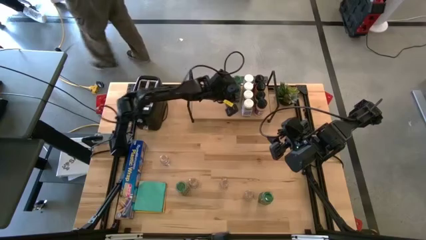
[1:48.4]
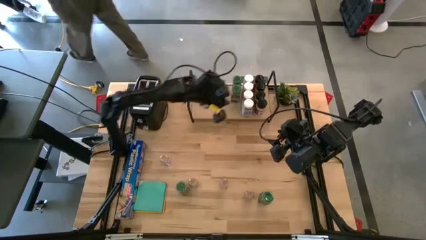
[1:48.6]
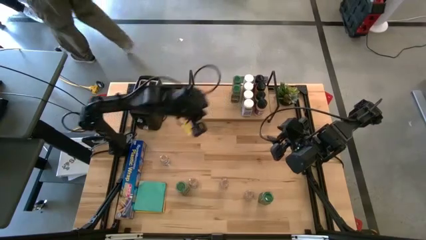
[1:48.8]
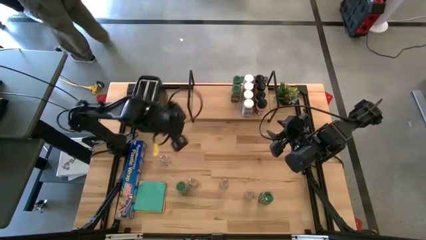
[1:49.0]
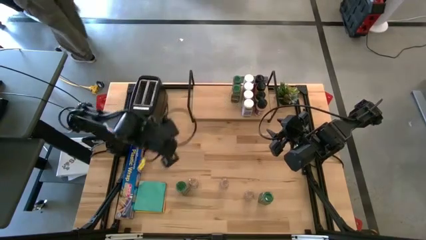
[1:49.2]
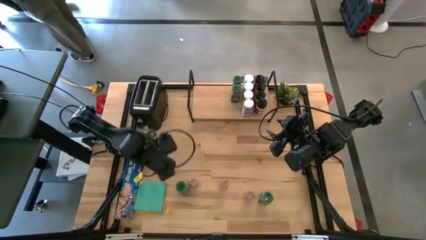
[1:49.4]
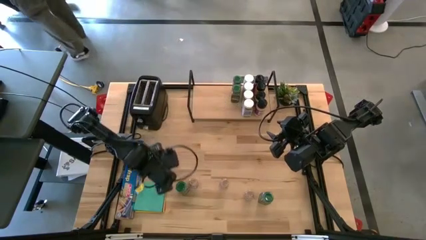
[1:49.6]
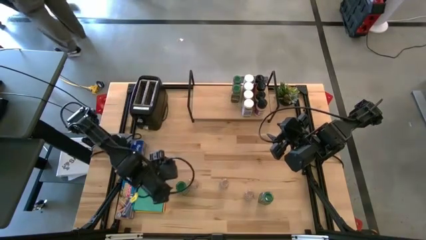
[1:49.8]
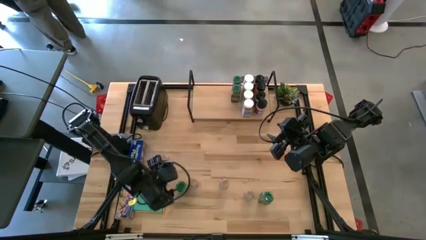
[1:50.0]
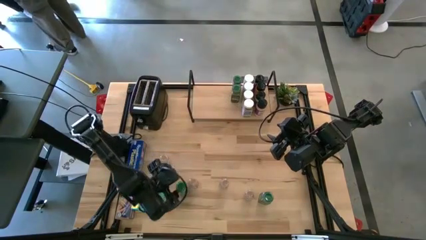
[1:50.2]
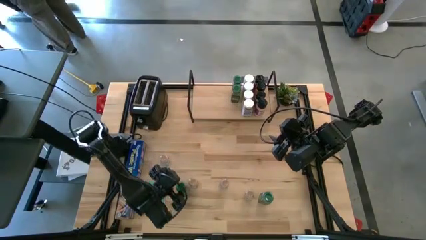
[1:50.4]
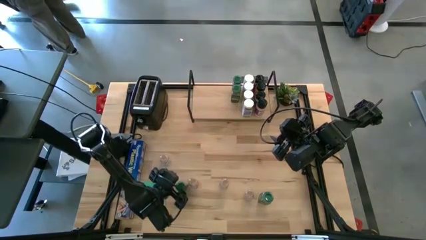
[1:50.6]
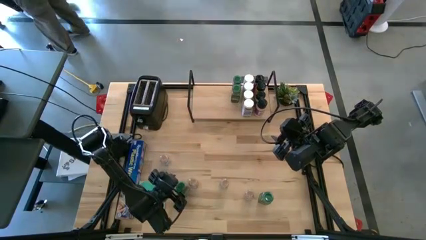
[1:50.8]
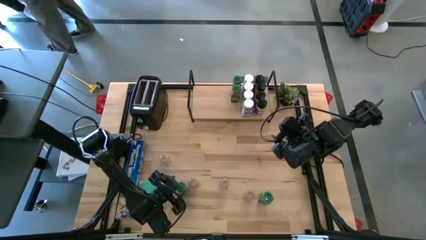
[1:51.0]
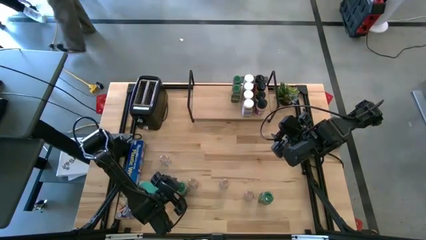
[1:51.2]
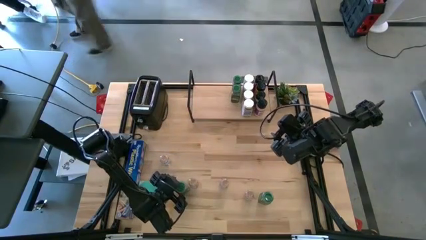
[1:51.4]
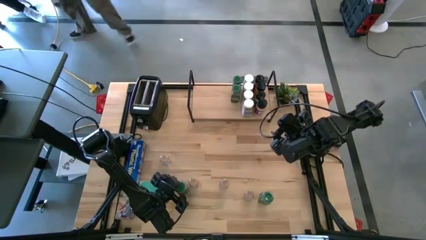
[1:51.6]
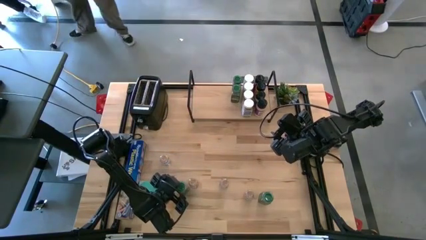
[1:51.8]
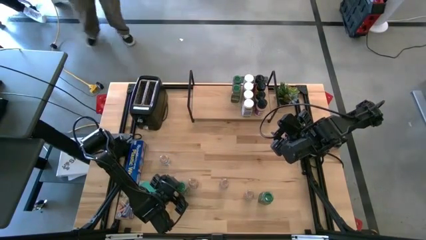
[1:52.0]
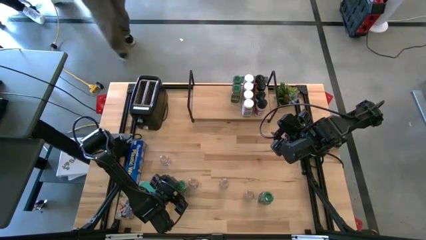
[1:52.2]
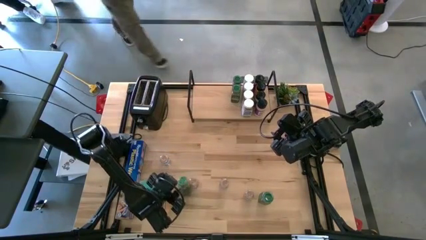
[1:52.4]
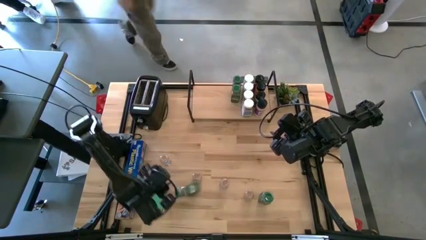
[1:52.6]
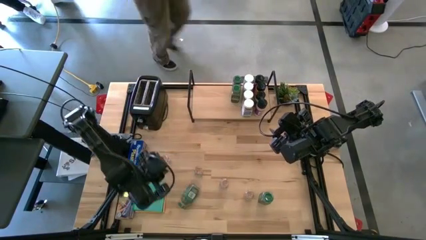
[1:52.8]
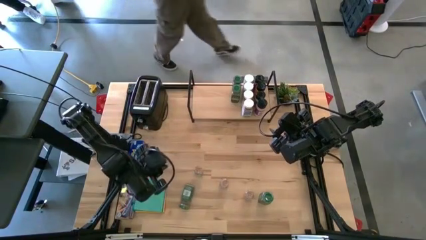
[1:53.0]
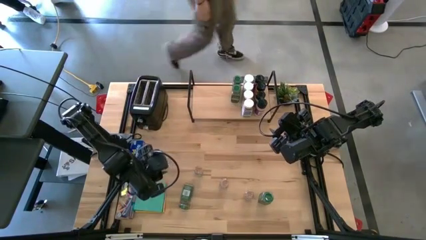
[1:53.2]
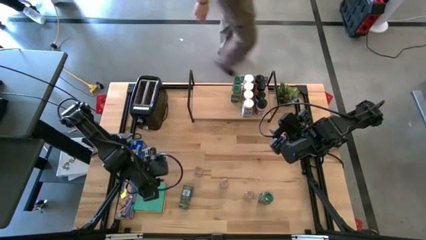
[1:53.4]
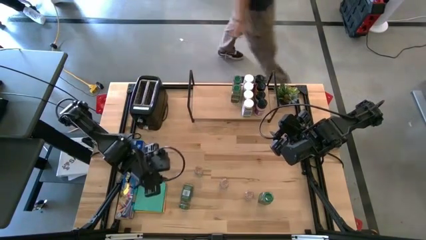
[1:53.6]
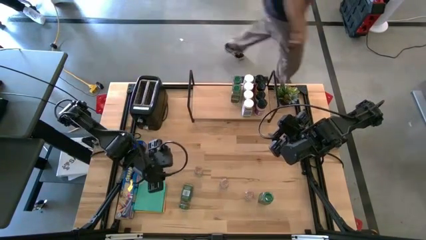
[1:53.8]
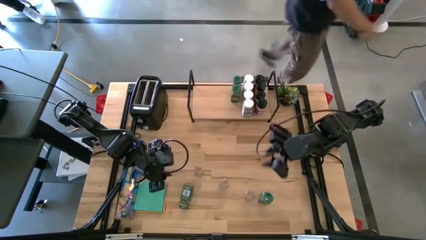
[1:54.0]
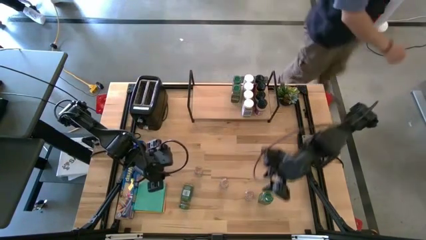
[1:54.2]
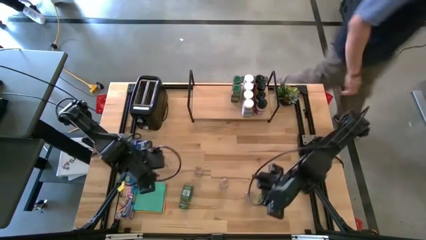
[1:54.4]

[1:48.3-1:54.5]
Task: Shelf spices
Put the left green spice bottle on the shelf and align with the other green spice bottles

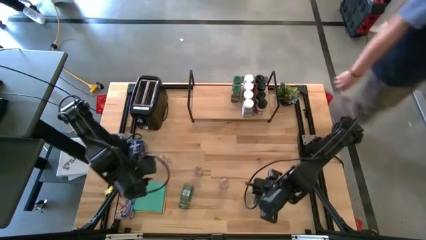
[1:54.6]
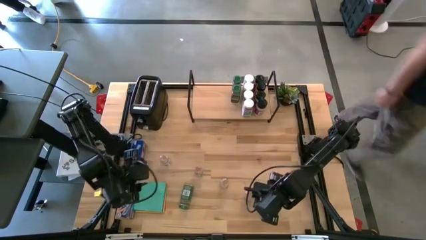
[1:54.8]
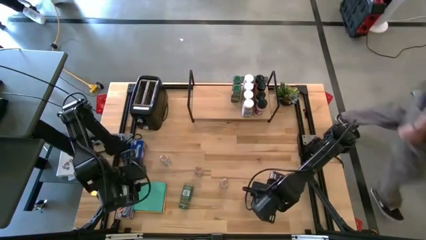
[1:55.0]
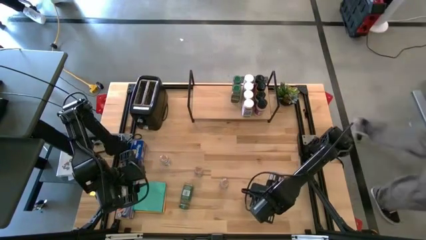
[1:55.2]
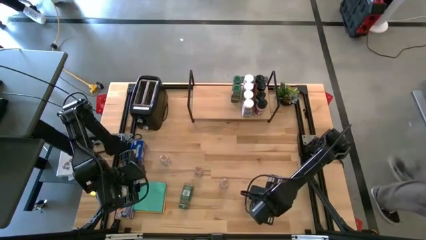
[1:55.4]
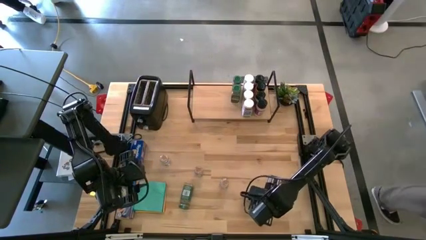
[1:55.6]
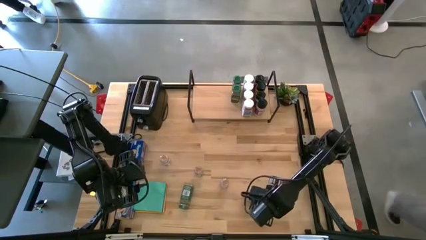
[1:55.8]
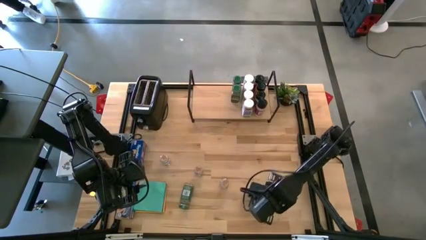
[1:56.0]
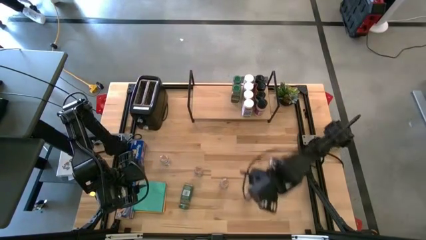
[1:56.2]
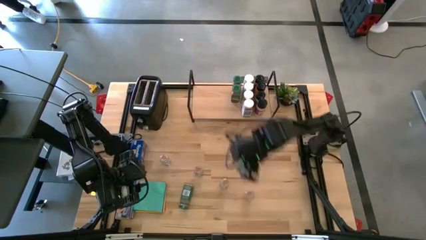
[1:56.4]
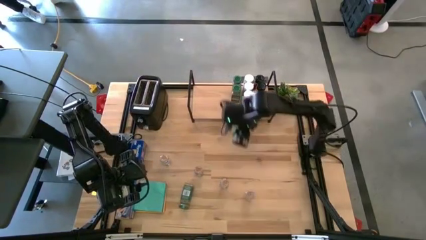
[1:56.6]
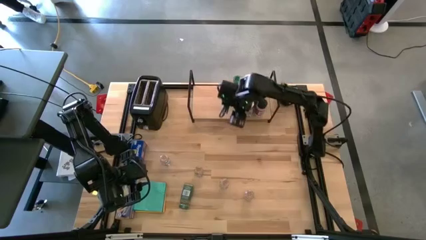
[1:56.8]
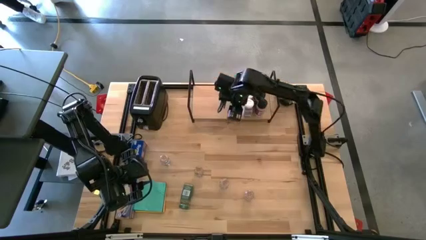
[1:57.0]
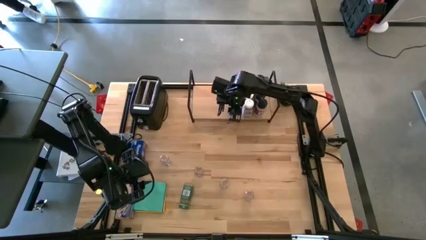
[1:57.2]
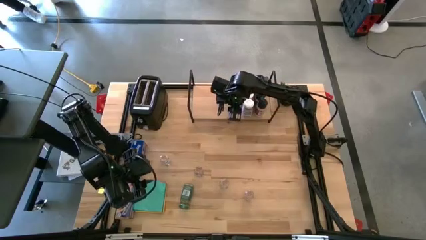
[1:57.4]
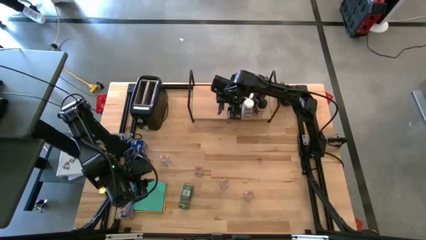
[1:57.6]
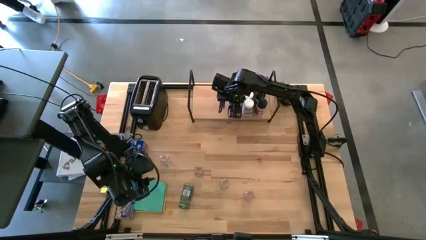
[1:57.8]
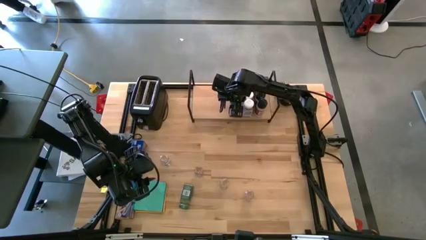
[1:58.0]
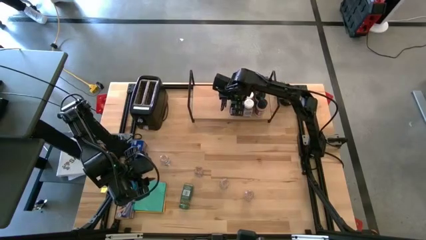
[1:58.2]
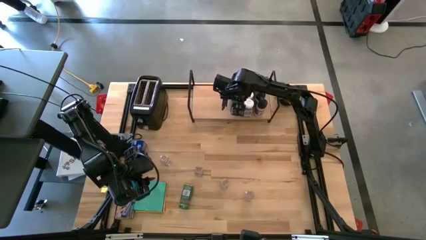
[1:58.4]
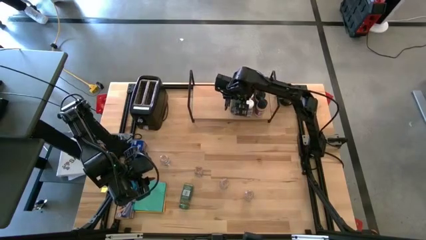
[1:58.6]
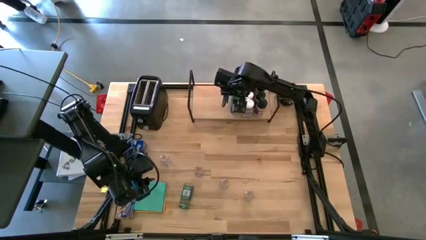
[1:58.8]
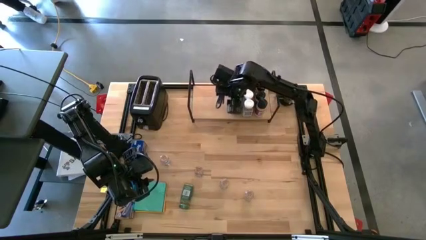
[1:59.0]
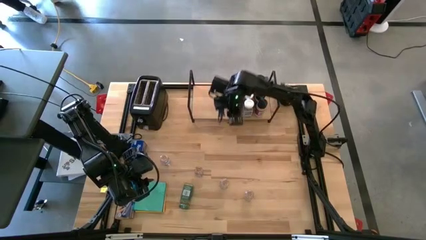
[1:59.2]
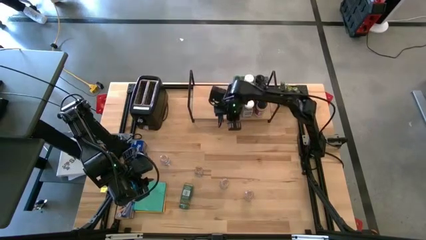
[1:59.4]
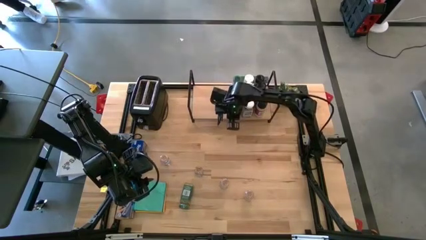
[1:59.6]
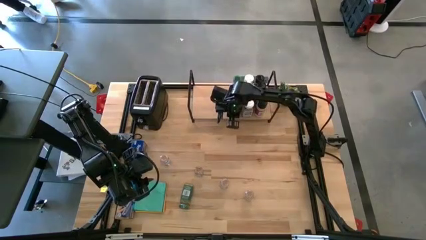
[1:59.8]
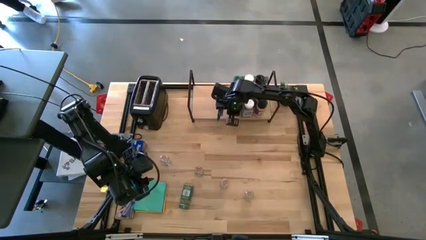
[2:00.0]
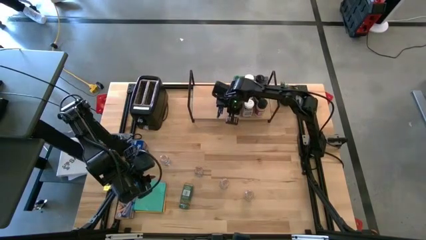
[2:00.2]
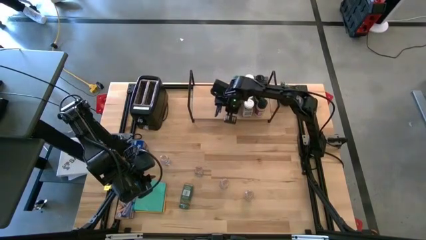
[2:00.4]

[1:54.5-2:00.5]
Put the right green spice bottle on the shelf and align with the other green spice bottles

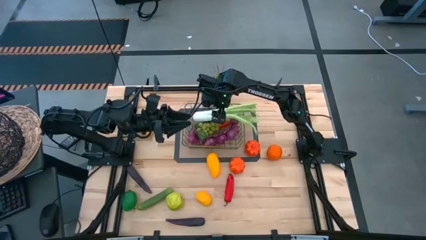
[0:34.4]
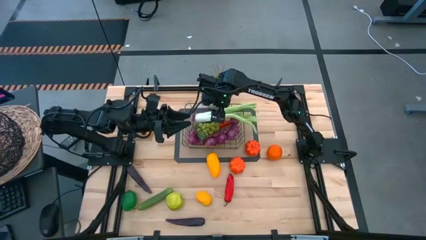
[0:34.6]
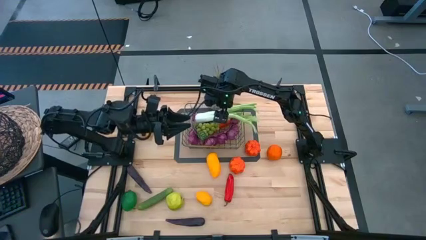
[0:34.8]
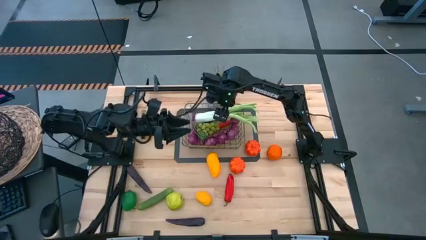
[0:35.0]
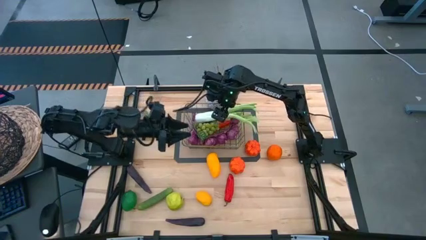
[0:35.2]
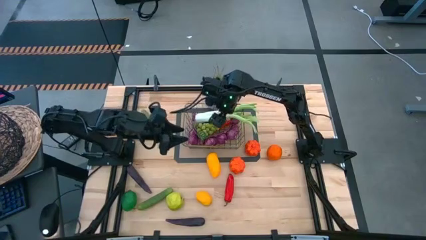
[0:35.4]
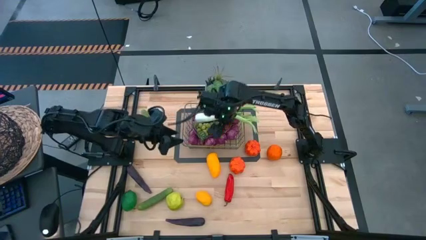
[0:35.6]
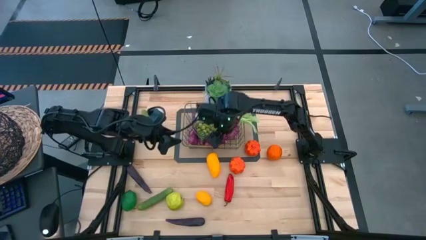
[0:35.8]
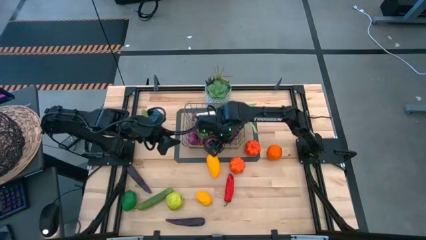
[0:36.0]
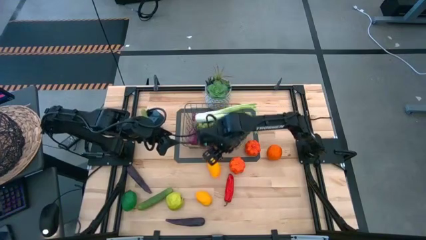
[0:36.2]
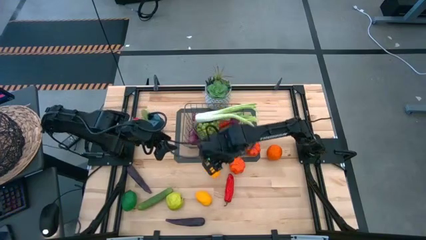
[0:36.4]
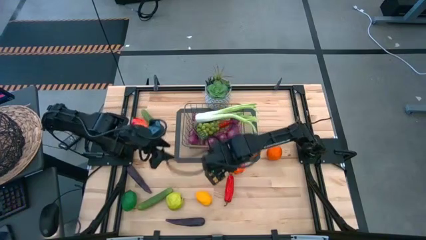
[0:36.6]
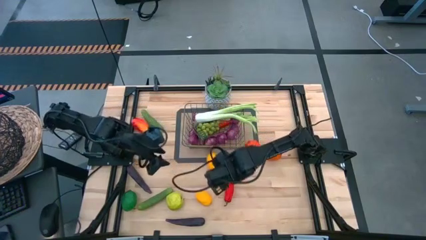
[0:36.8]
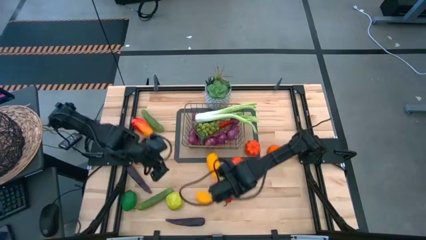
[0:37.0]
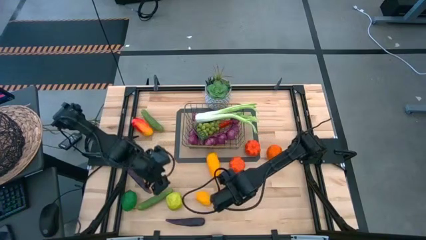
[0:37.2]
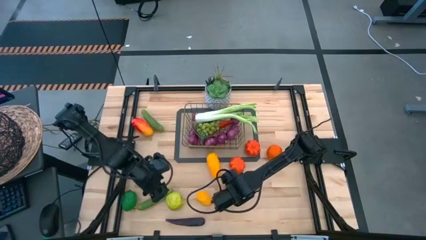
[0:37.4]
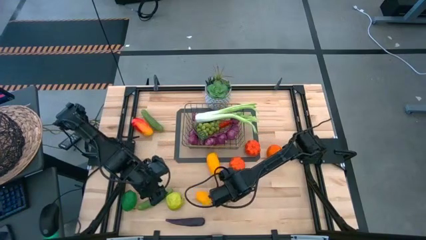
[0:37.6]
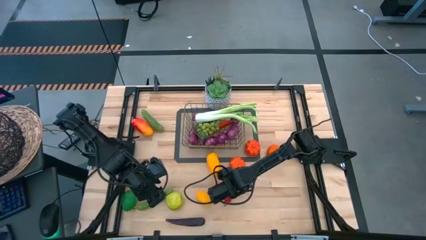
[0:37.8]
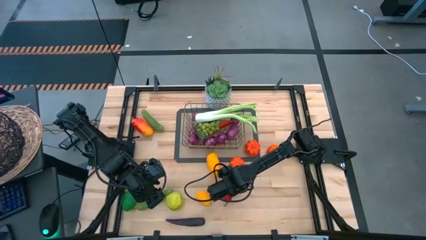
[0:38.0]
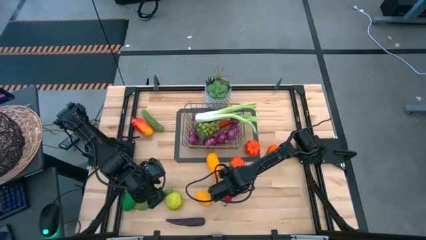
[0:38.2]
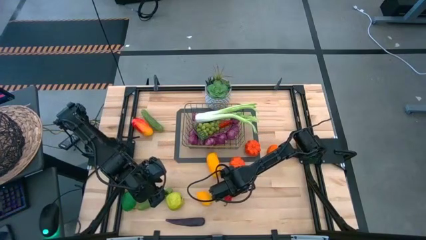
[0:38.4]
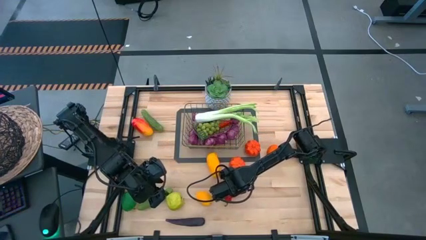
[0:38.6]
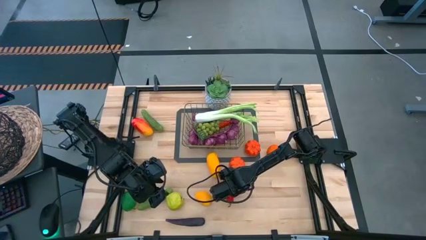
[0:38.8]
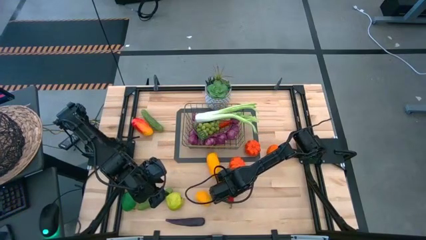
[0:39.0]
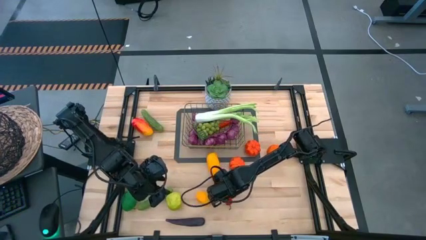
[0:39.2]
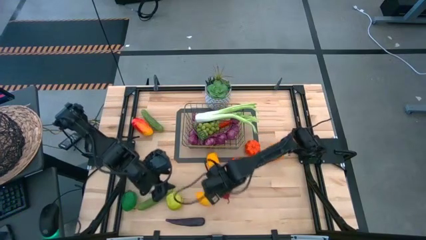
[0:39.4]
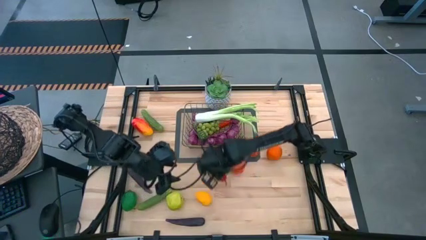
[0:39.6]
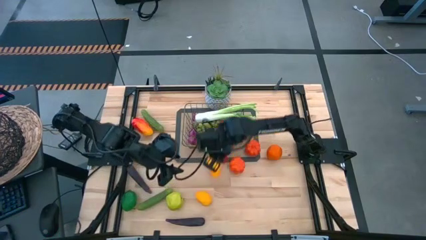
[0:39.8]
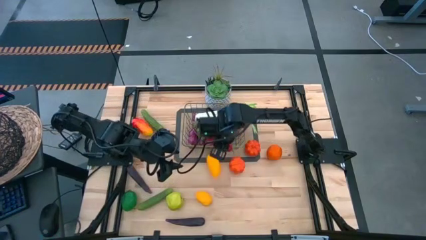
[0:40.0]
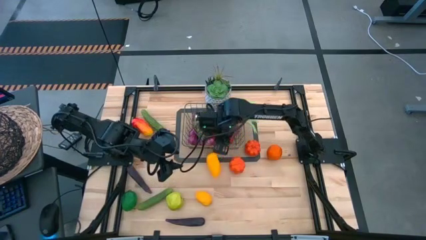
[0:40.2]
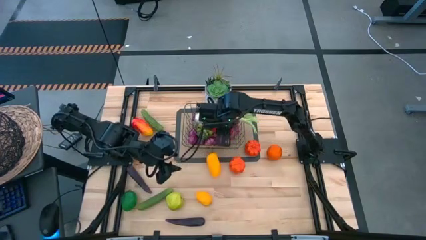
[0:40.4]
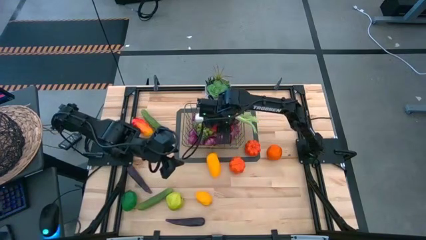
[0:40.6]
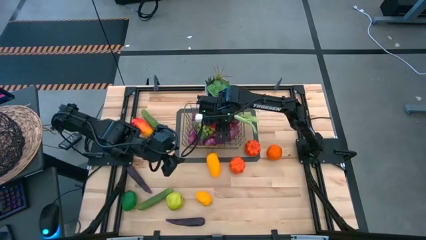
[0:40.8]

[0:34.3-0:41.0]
Task: Build produce basket
Put the red chili pepper into the wire basket
